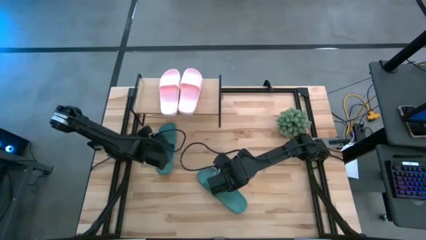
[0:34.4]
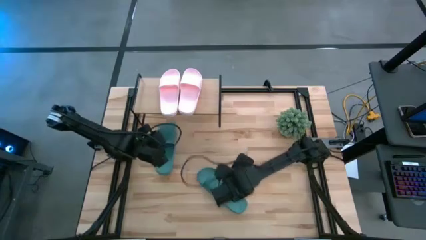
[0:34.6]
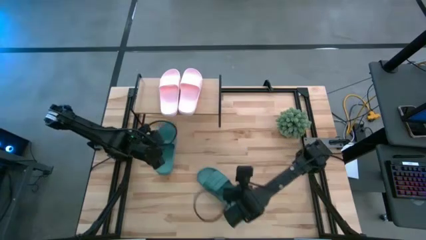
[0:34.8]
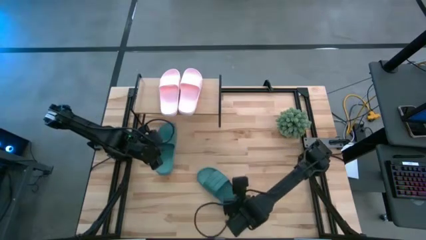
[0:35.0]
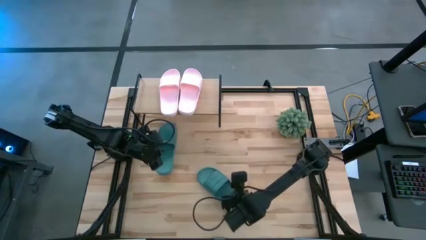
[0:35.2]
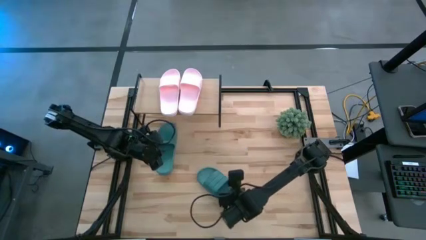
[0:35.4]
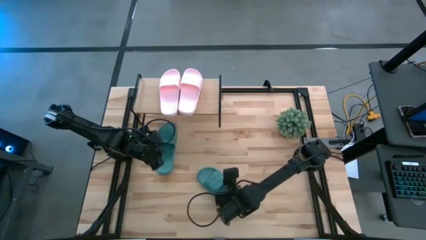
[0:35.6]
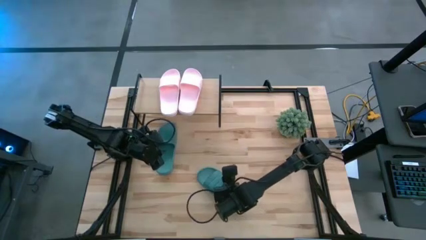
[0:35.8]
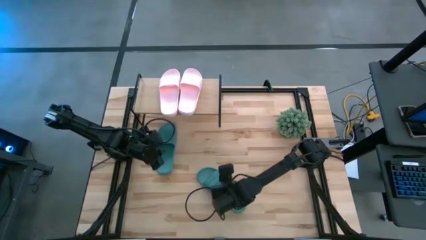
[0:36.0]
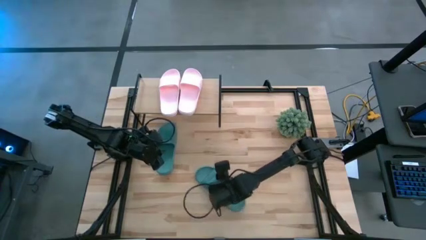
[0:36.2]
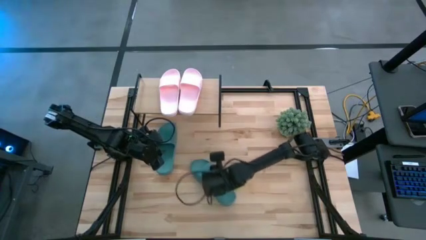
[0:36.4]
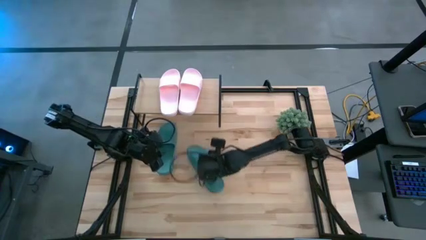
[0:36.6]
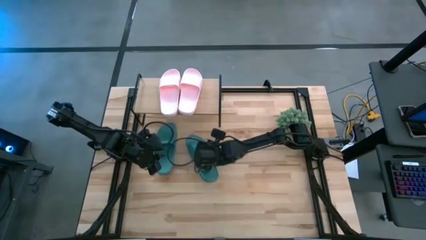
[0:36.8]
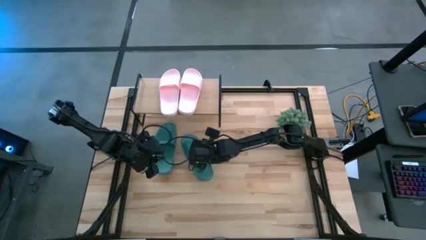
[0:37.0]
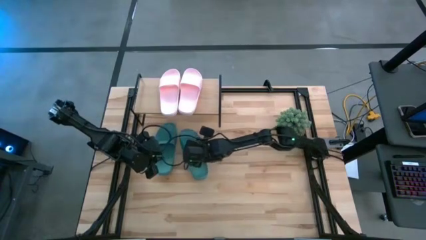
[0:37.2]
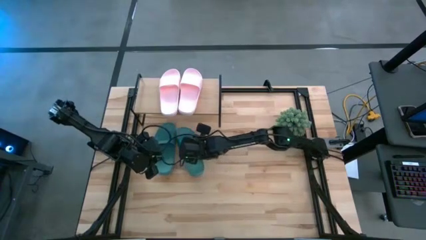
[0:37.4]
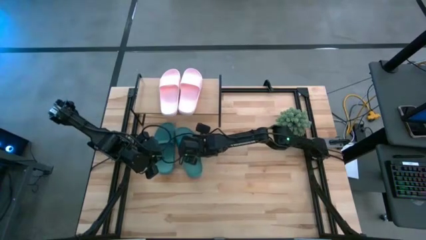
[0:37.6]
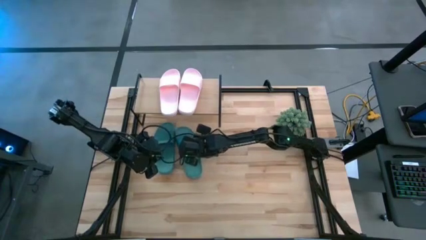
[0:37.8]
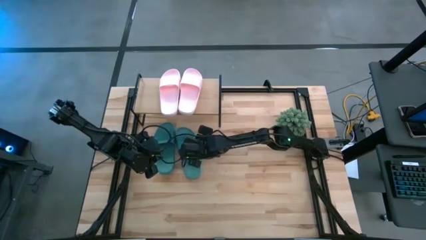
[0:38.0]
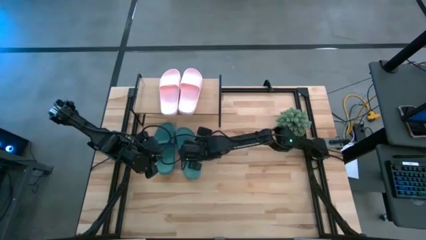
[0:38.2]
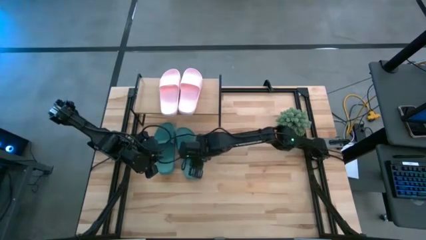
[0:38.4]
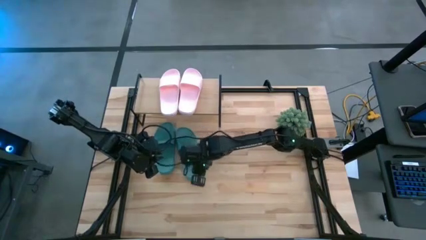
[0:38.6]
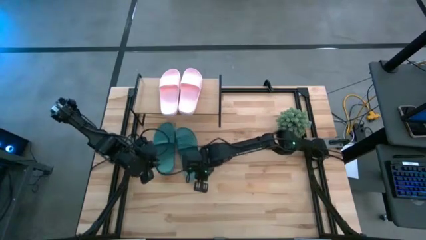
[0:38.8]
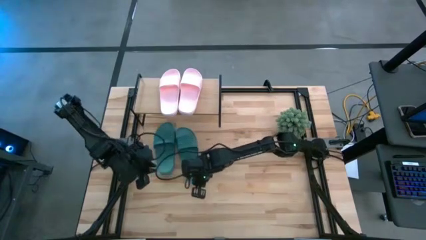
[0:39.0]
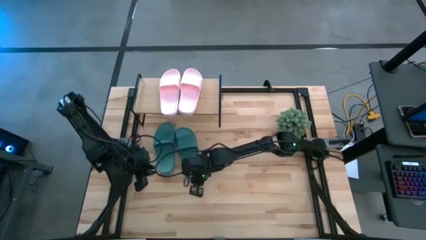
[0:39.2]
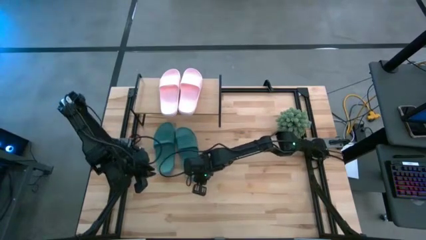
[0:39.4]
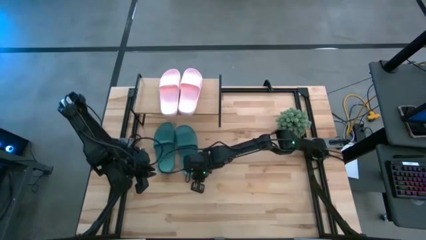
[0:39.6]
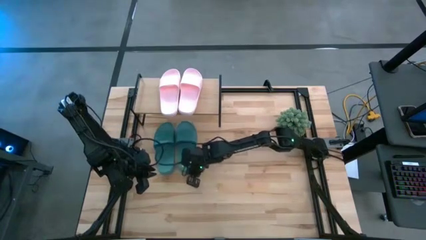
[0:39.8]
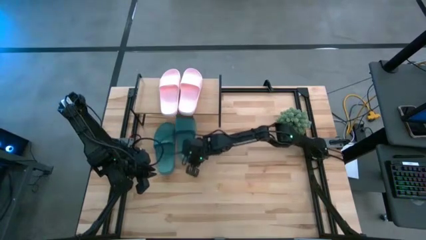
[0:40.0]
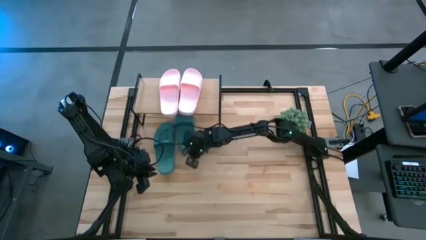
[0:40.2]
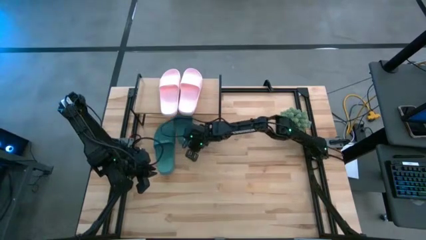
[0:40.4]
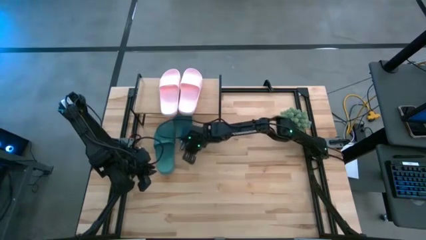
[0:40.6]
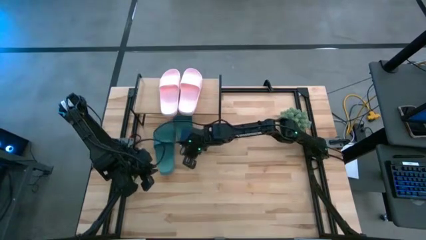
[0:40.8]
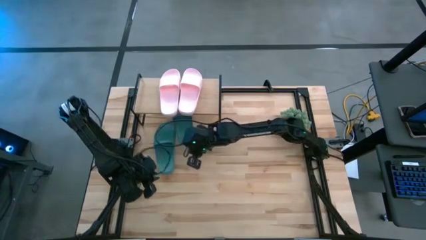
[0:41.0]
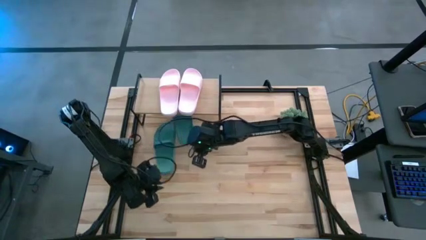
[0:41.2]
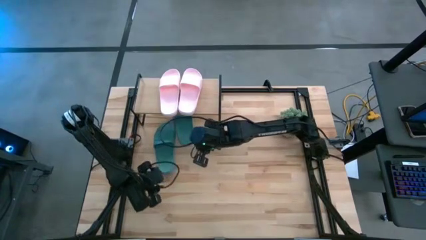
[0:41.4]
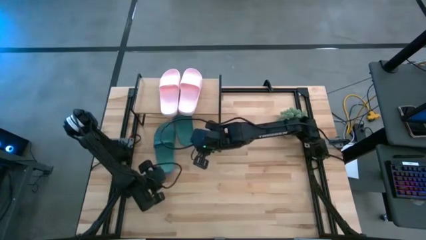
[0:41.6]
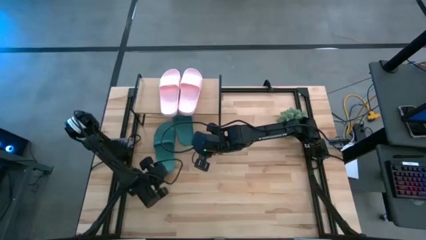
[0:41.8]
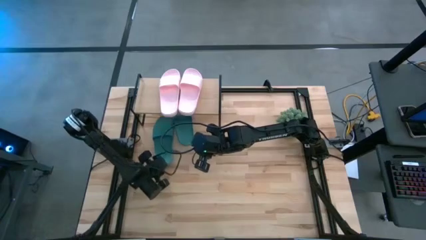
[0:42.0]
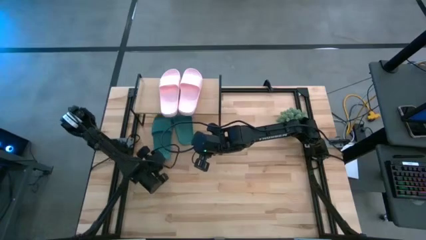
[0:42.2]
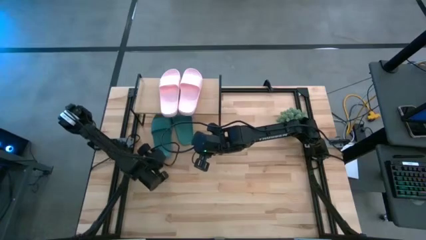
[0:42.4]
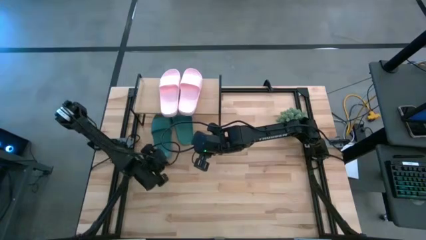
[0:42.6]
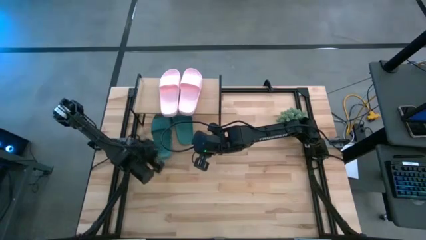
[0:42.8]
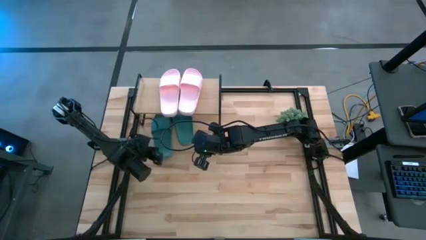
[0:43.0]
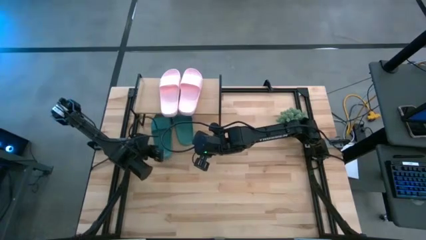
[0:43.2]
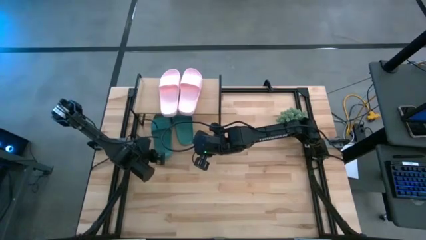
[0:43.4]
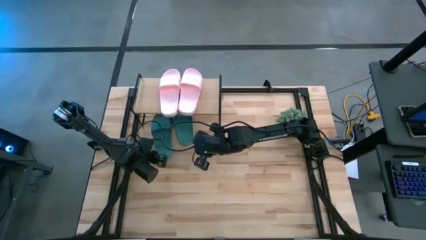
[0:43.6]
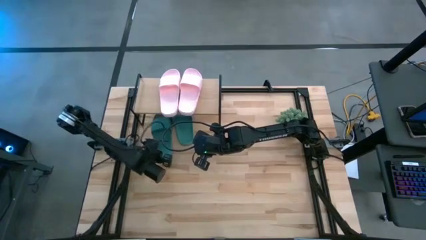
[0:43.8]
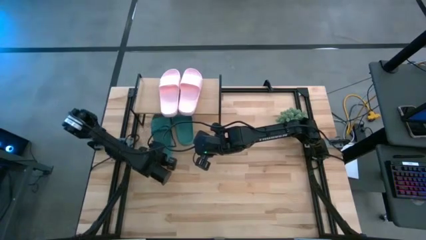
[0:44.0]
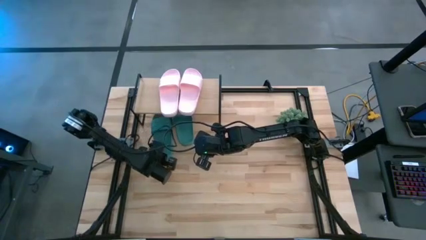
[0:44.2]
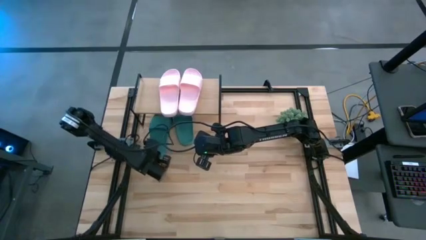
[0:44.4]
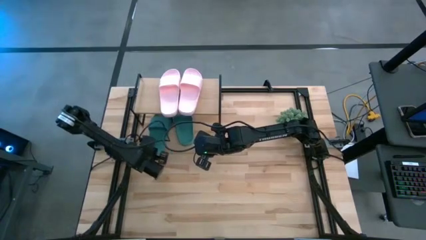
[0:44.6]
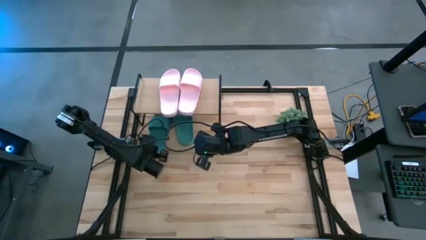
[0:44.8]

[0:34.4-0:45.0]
Task: Pick and place slides into the shelf
Put the right green slipper under the shelf
